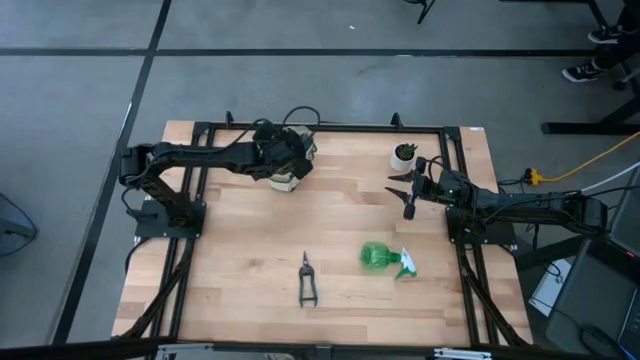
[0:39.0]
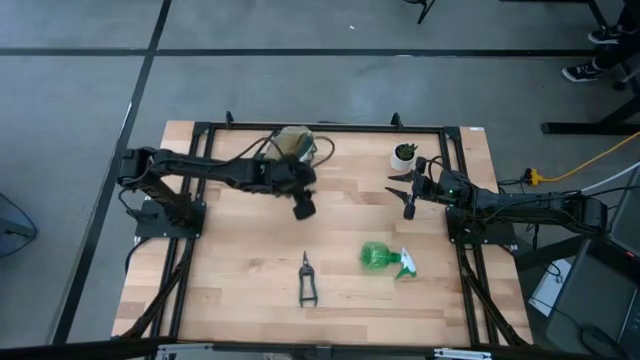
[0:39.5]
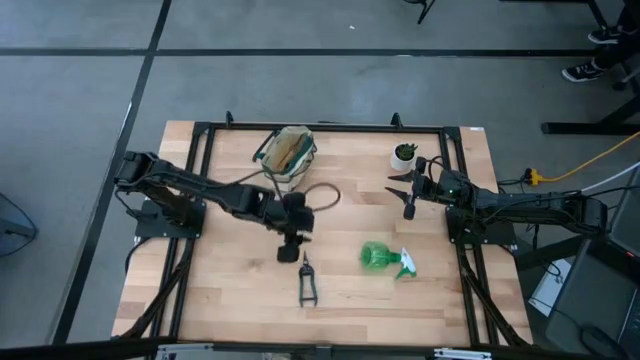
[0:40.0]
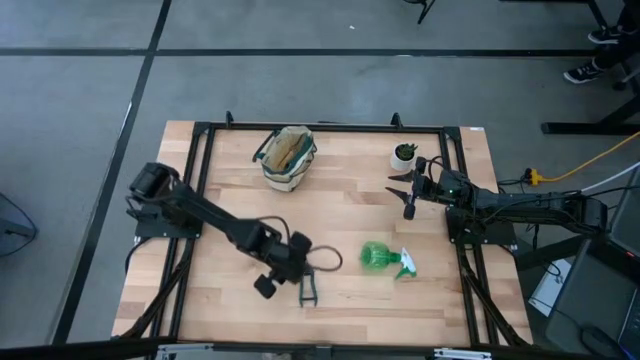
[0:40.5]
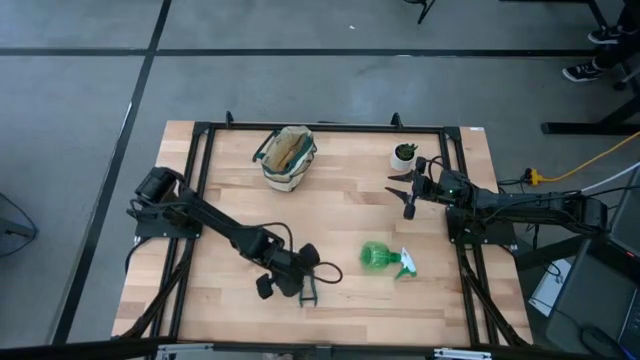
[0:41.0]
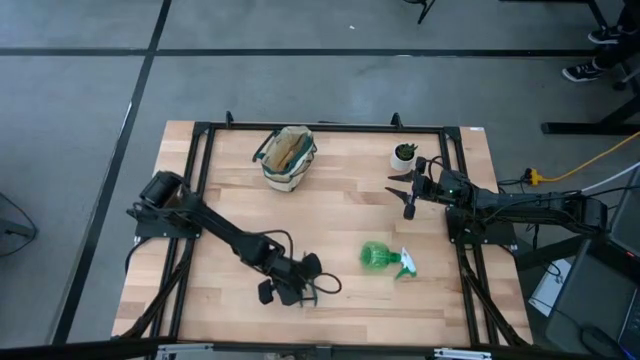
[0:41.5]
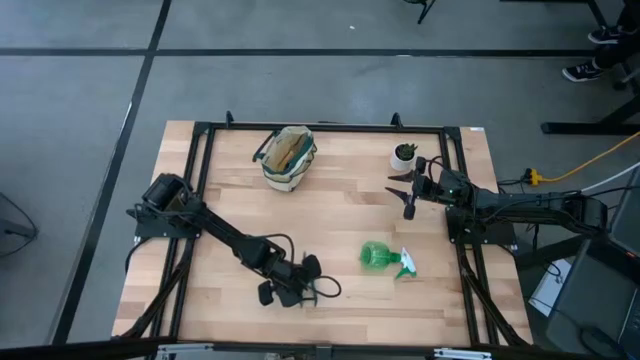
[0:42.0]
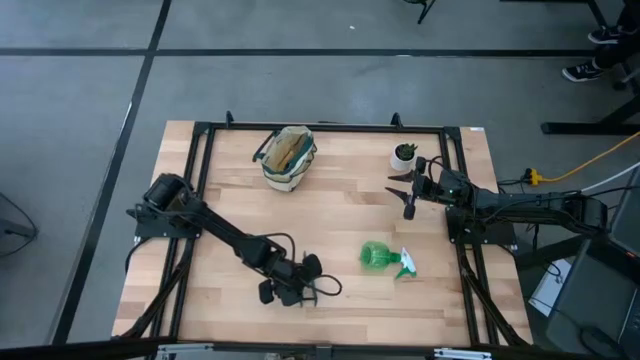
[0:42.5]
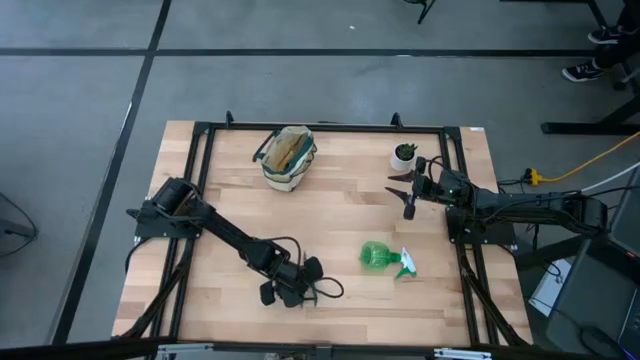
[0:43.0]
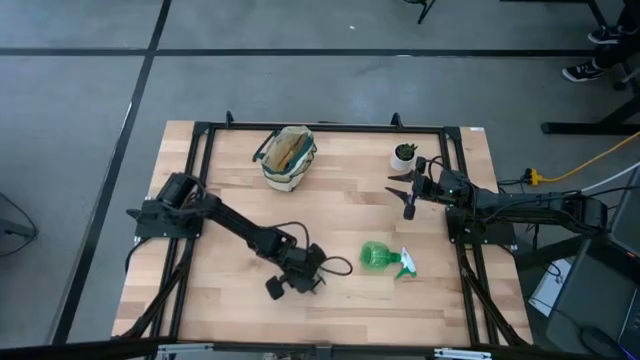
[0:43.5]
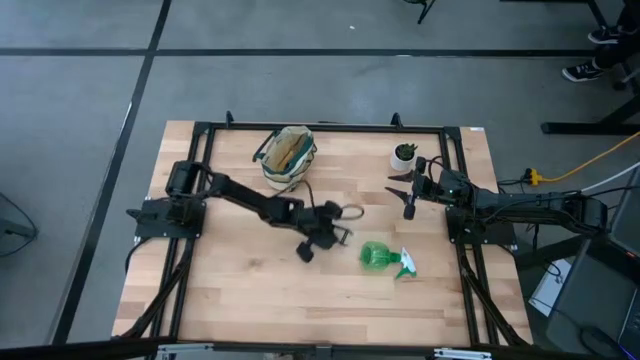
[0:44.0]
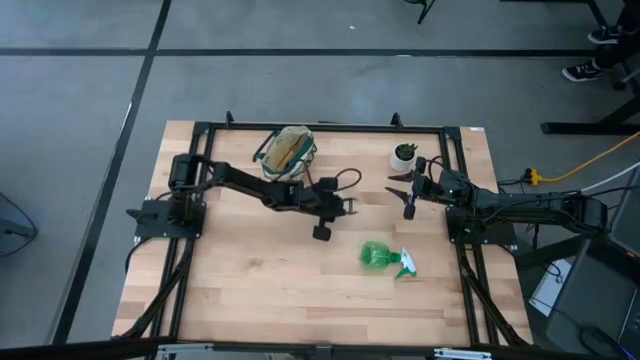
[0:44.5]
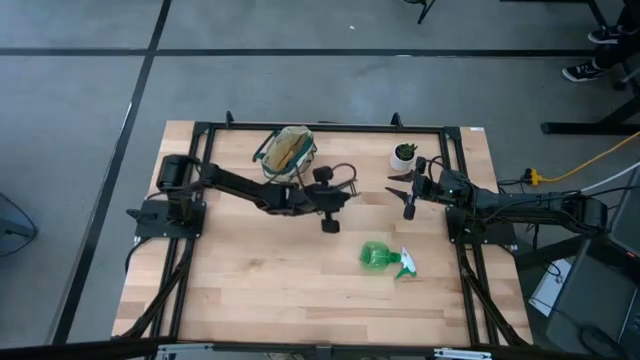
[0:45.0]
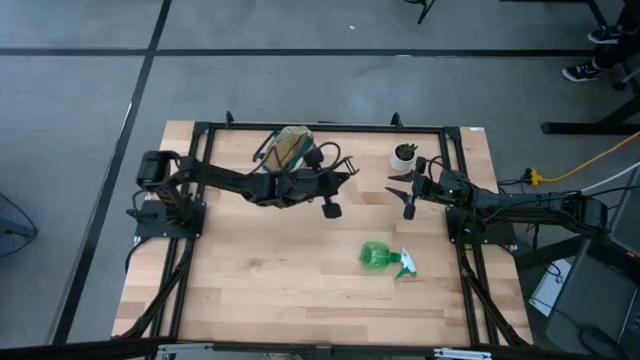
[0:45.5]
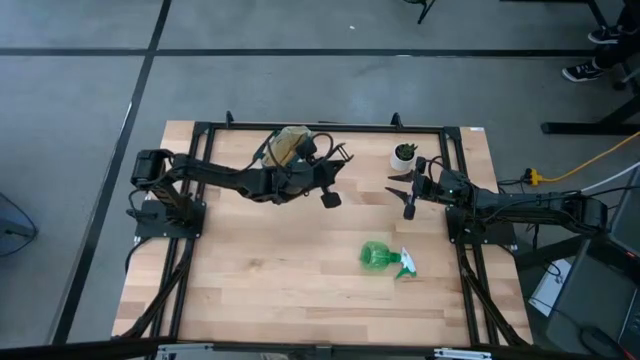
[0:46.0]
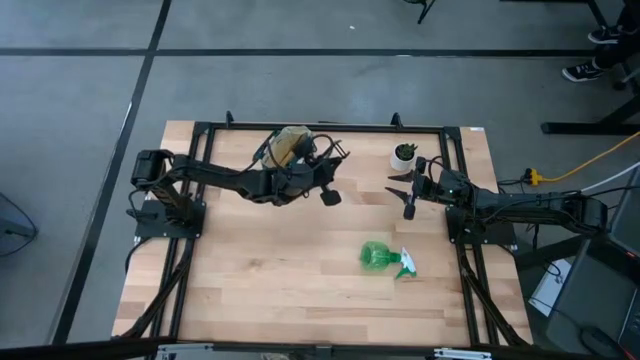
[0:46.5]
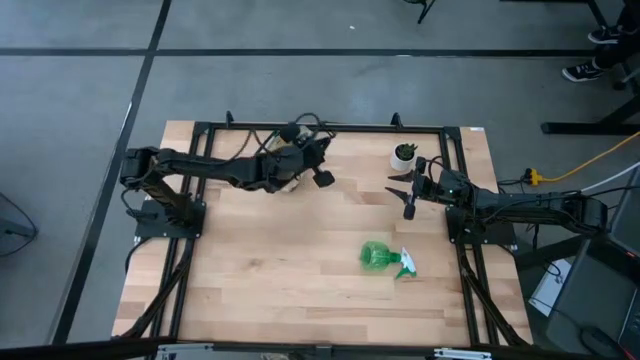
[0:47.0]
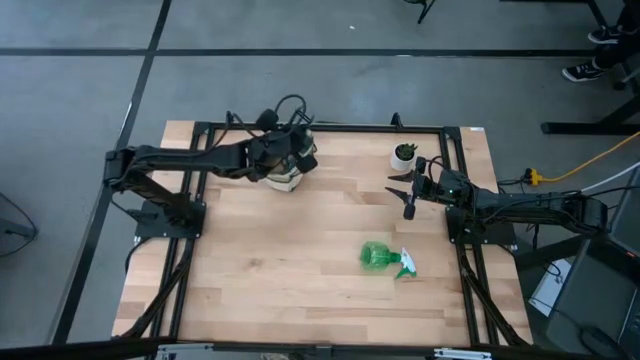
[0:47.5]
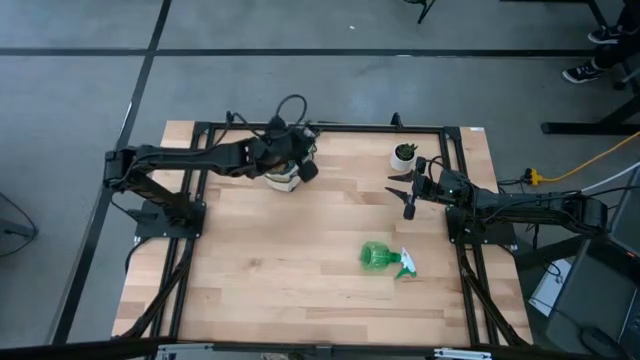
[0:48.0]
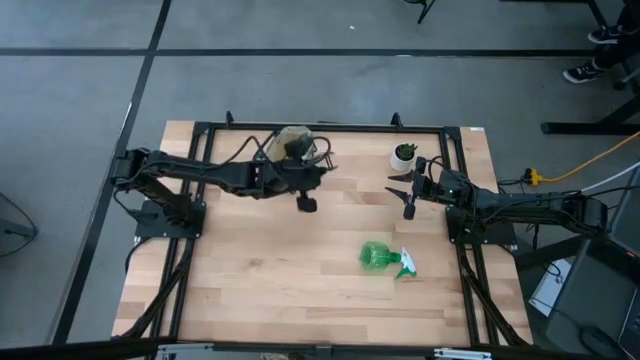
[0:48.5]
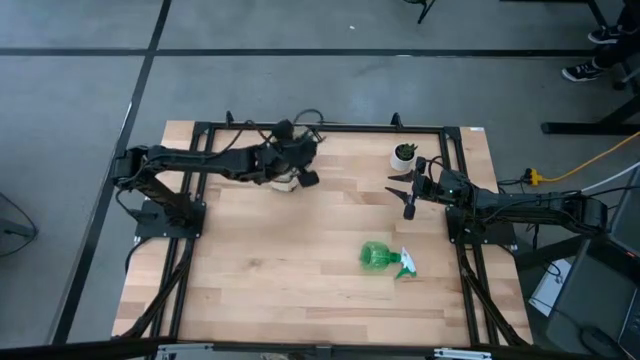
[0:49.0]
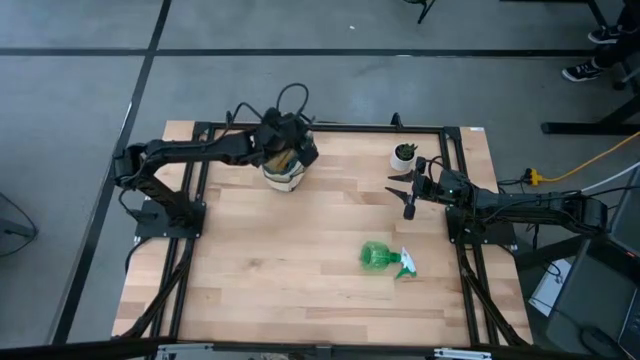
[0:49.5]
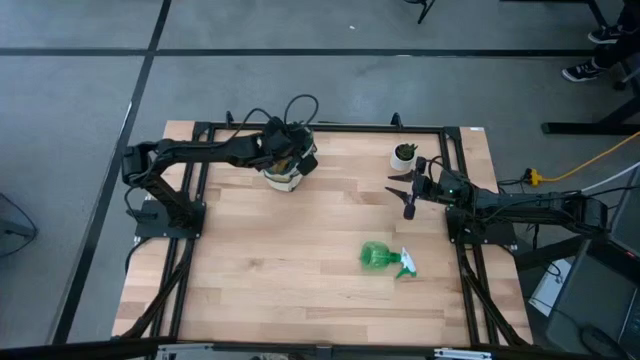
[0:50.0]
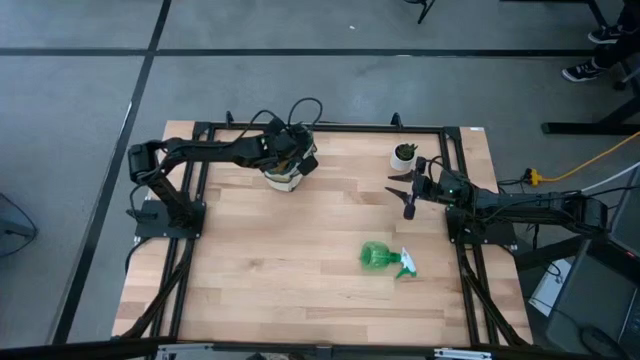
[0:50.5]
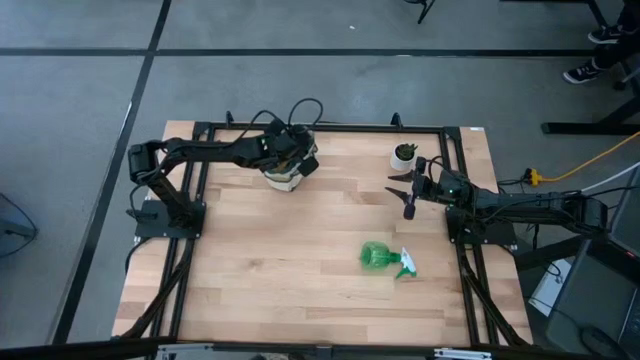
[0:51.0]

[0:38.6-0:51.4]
Task: Pick & Place Garden tools in Gardening bag
Put the shear cutter into the gardening bag

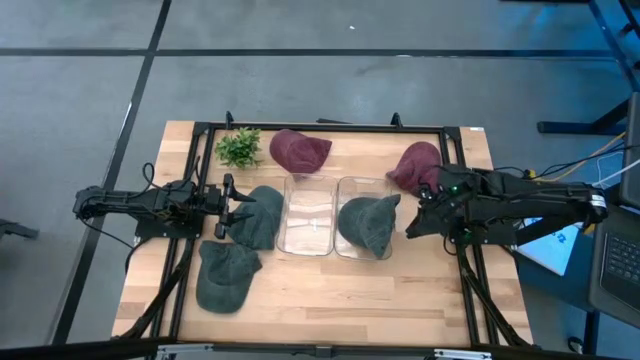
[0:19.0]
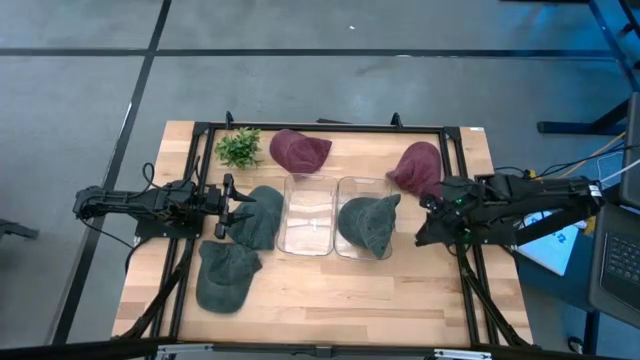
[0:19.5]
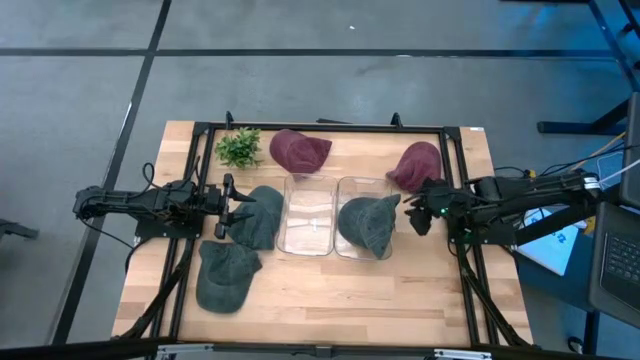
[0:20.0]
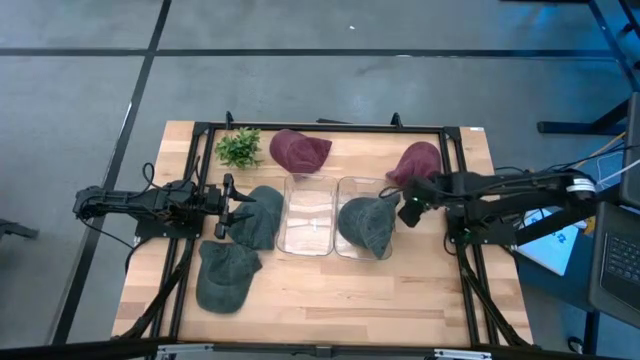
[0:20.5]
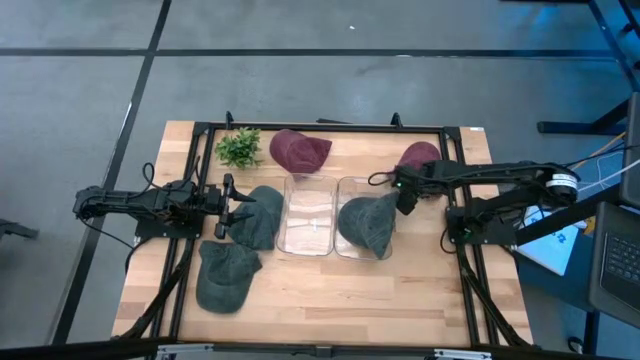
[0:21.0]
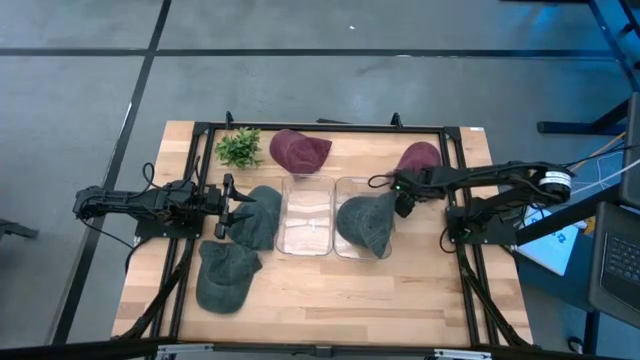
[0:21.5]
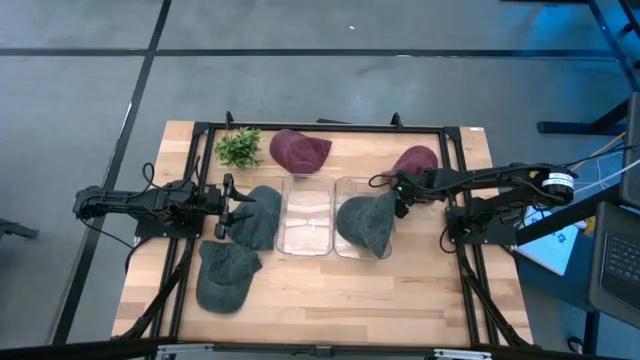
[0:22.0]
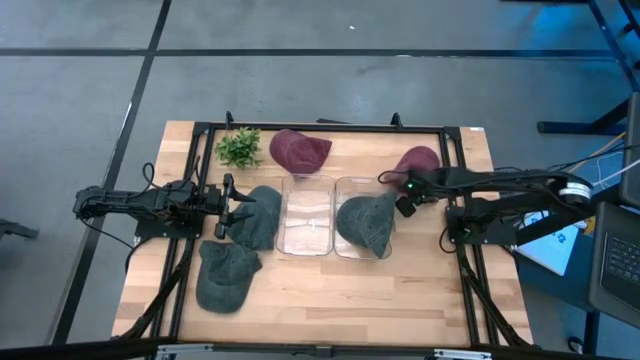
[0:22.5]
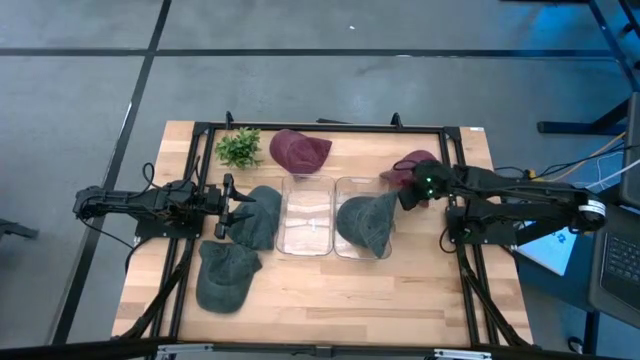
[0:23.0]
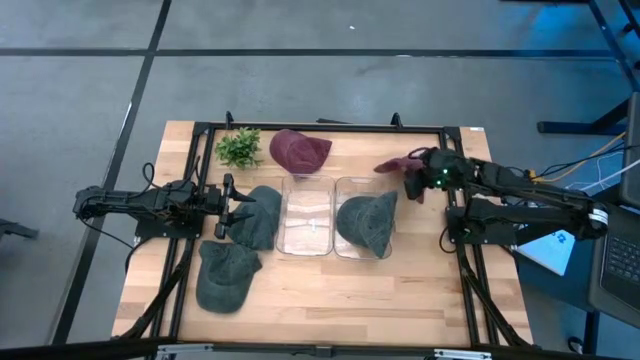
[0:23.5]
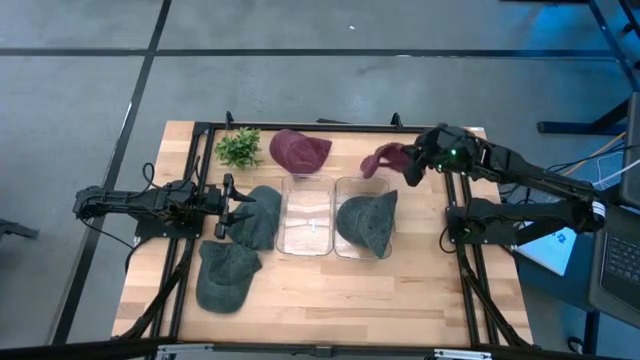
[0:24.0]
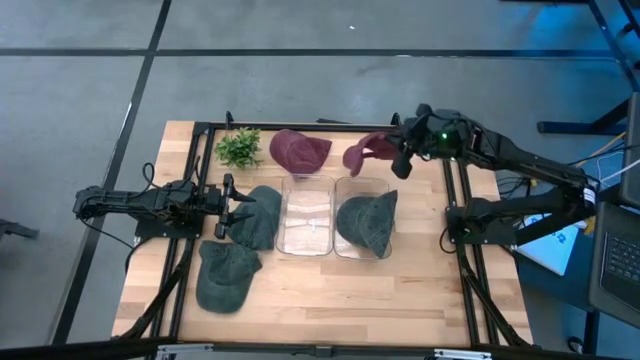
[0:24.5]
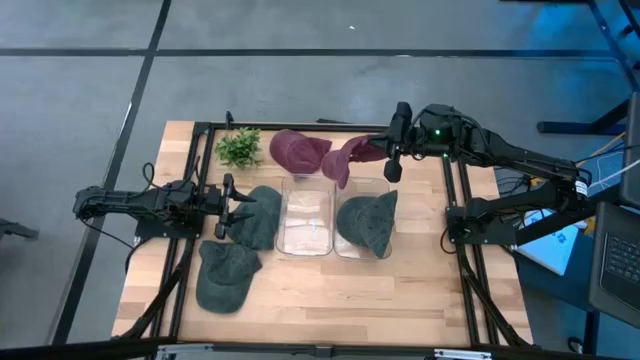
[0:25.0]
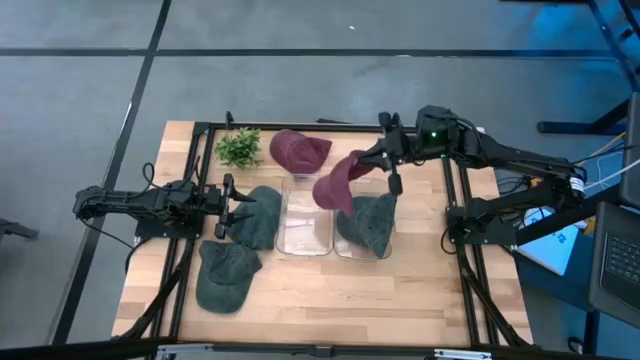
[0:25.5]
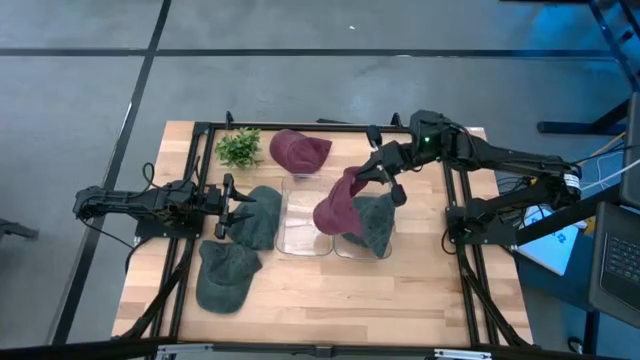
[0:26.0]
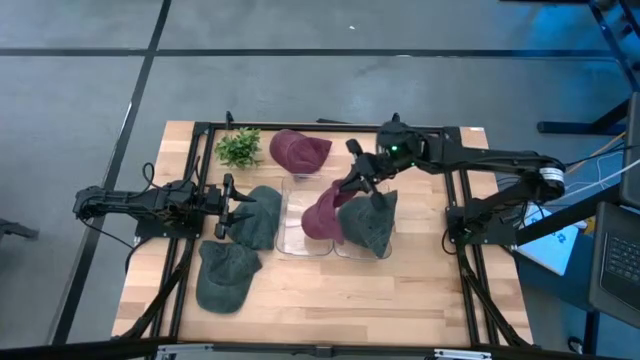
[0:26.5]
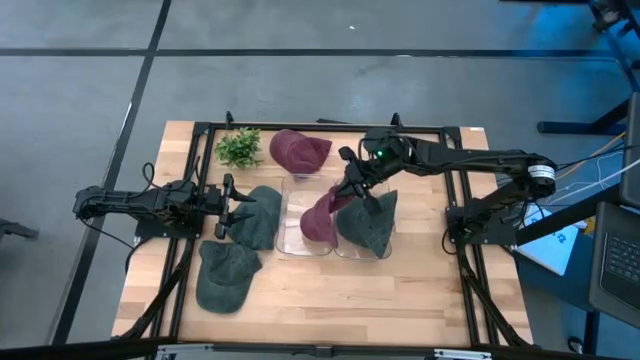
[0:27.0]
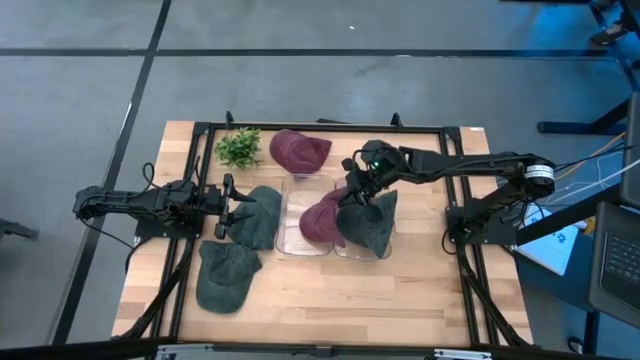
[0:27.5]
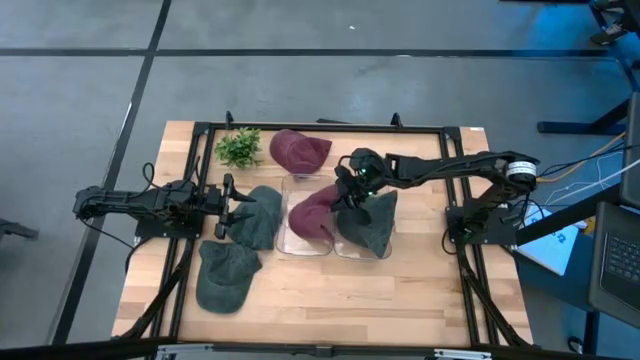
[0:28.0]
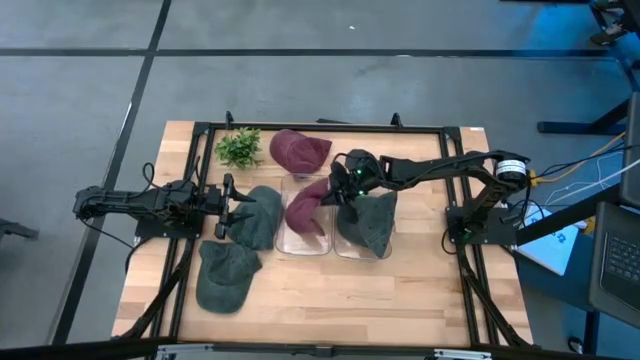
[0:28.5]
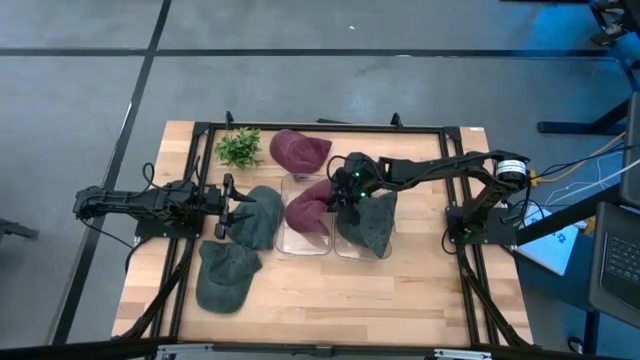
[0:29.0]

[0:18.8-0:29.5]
Task: Pick & Place hat
Put the right red cap into the left transparent bin
